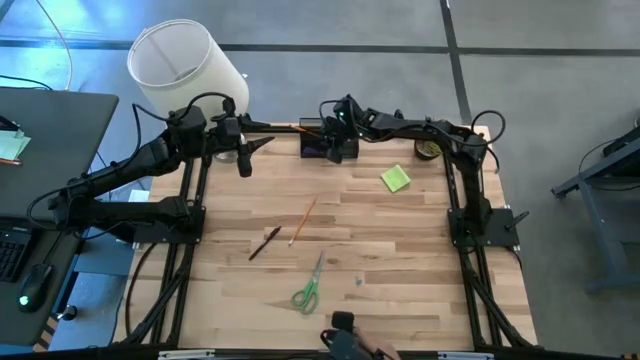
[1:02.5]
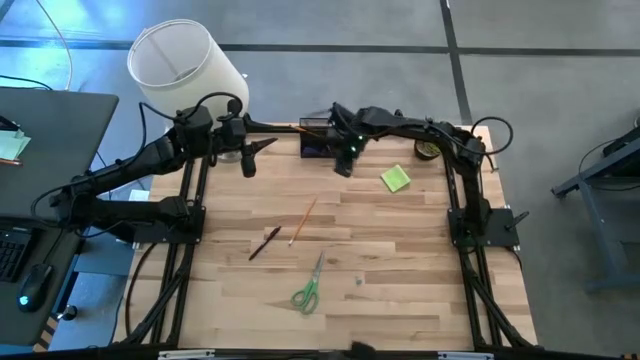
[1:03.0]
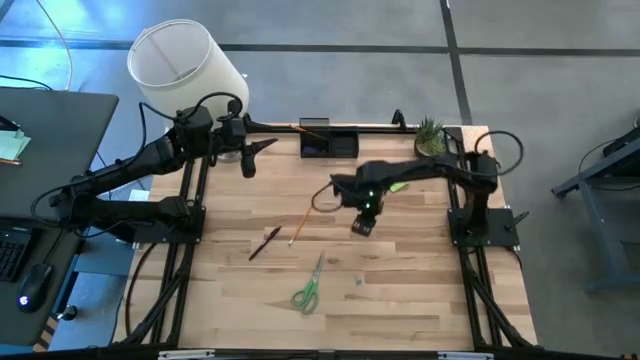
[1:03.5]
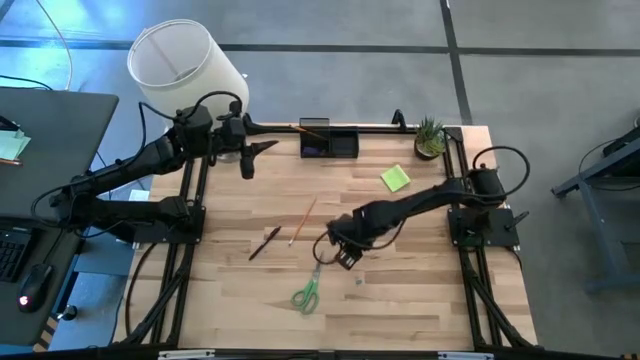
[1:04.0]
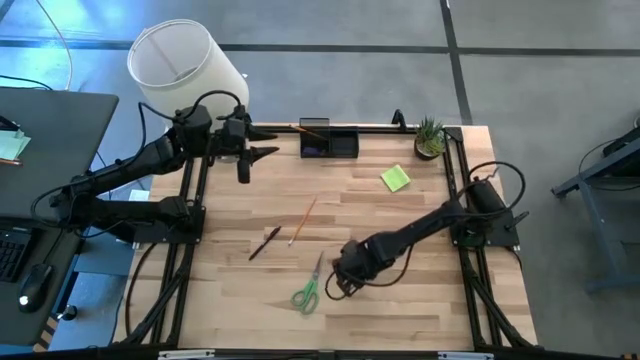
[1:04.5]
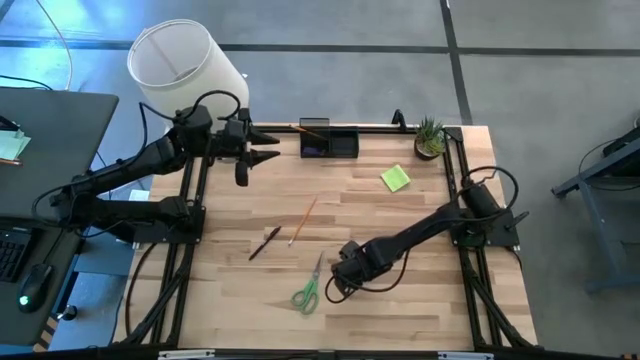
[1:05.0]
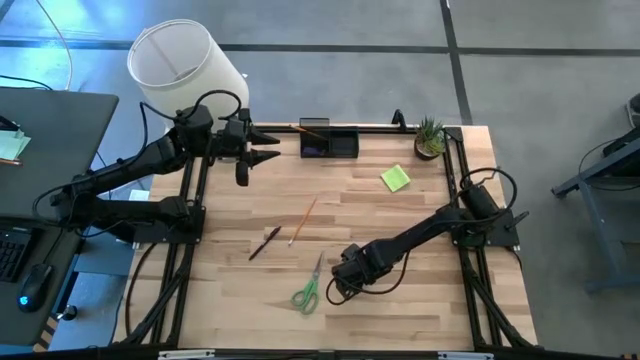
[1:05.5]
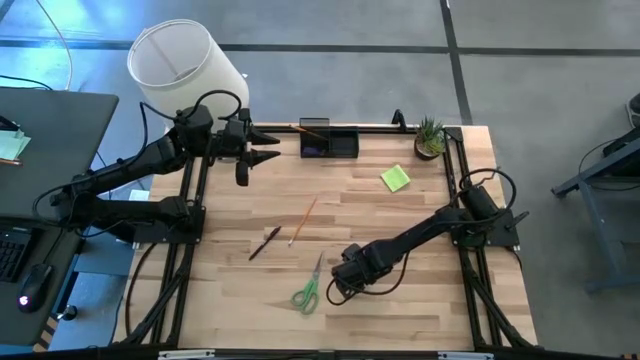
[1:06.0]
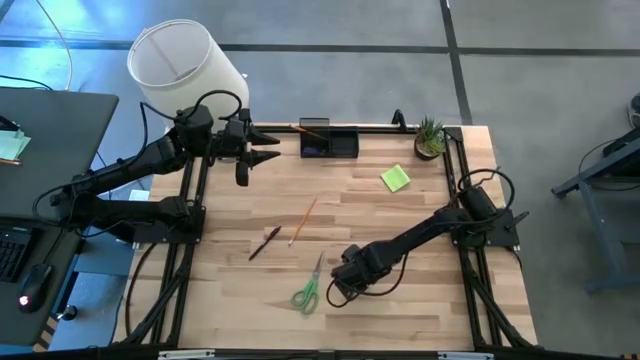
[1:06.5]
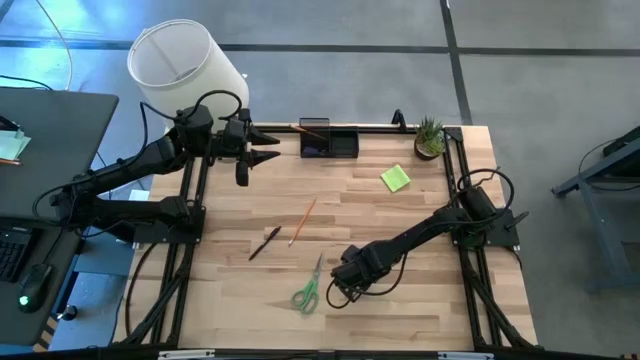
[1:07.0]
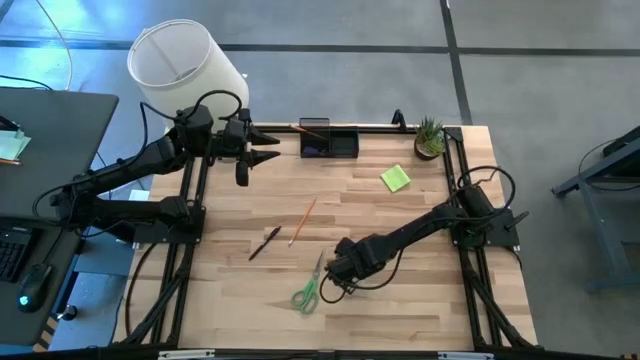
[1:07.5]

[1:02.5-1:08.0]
Task: Pick and place office supplies into organizer
Put the blue binder clip into the black desk organizer

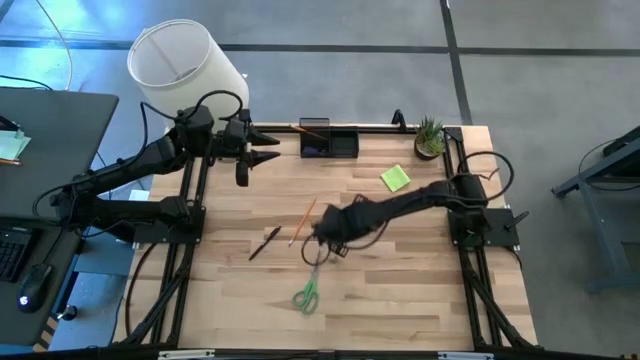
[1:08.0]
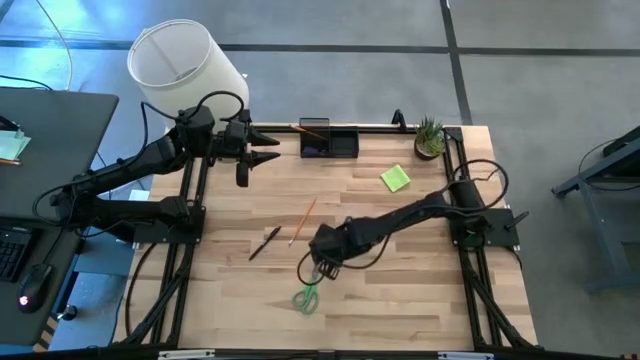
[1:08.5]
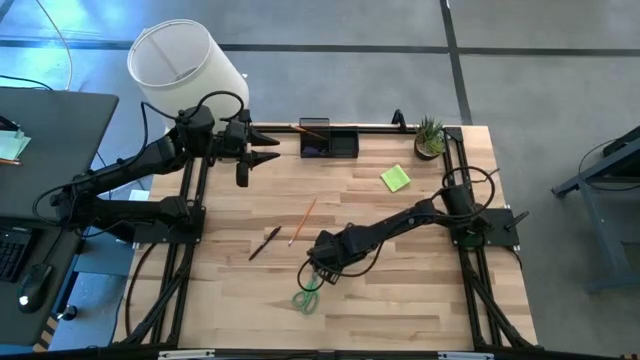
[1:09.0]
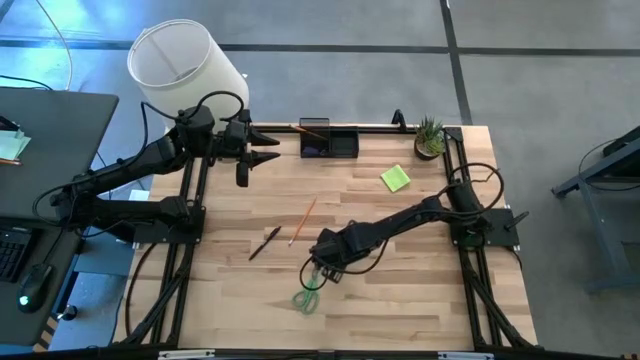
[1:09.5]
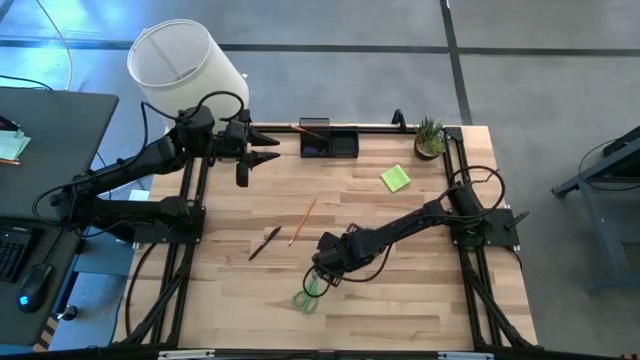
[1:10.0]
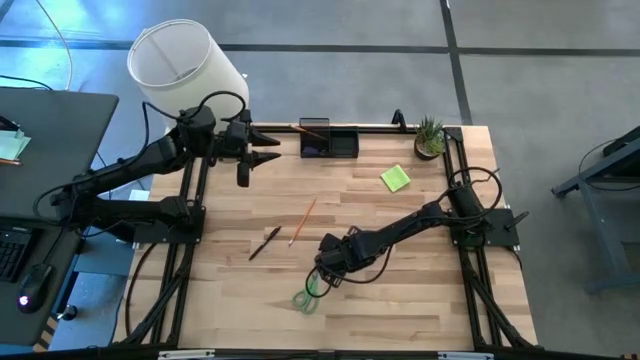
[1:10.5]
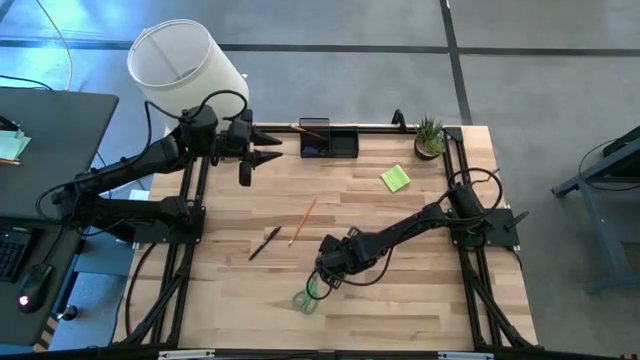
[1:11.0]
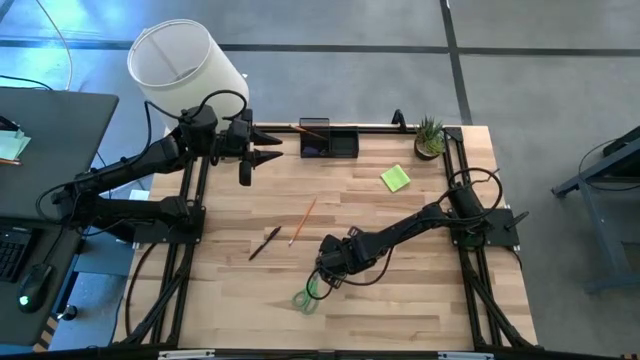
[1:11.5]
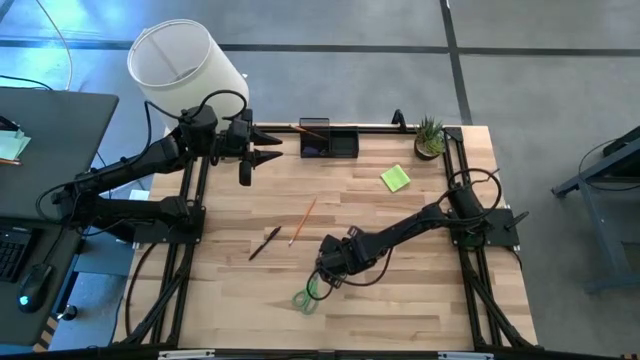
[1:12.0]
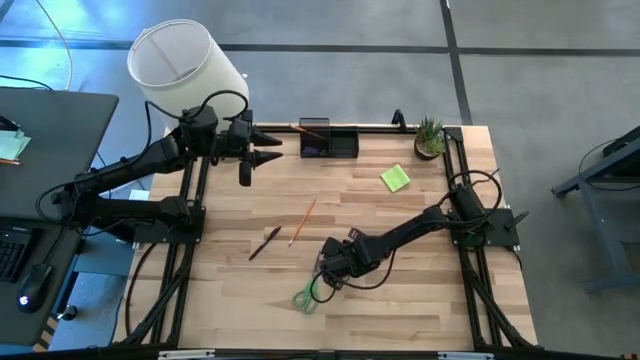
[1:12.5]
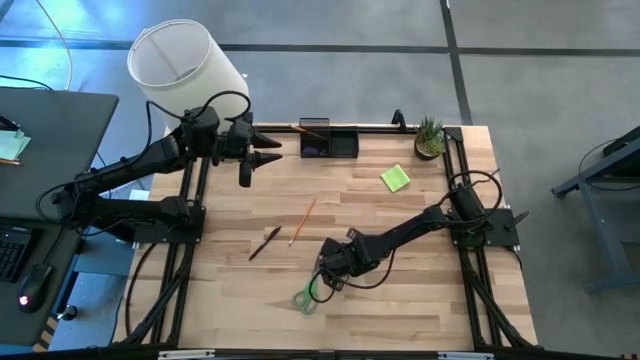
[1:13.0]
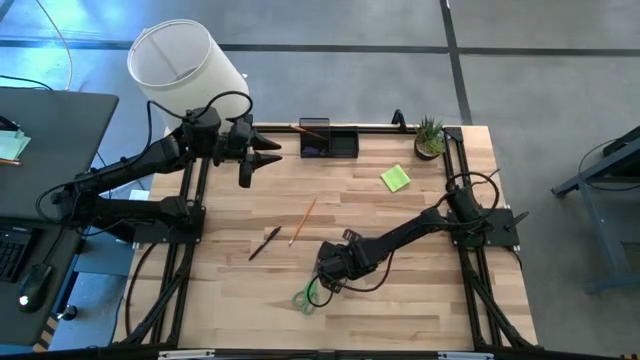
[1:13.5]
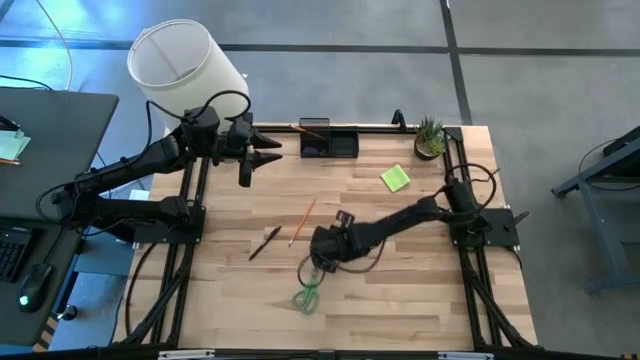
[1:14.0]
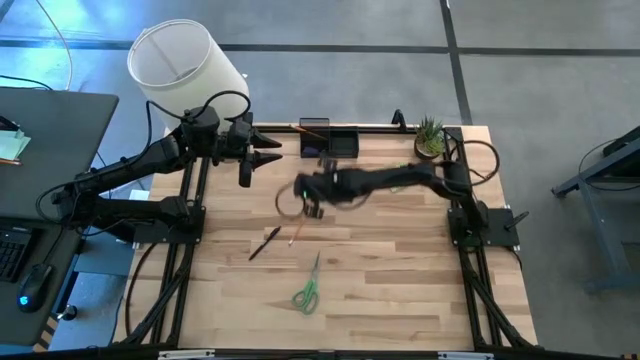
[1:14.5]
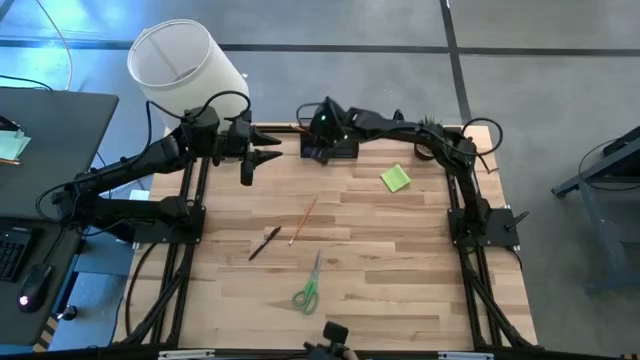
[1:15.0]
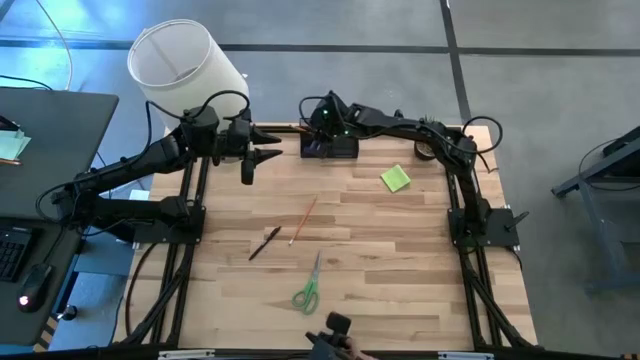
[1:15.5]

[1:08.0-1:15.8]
Put the blue binder clip into the black desk organizer

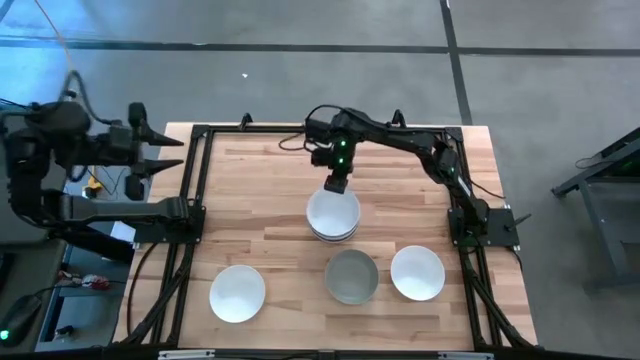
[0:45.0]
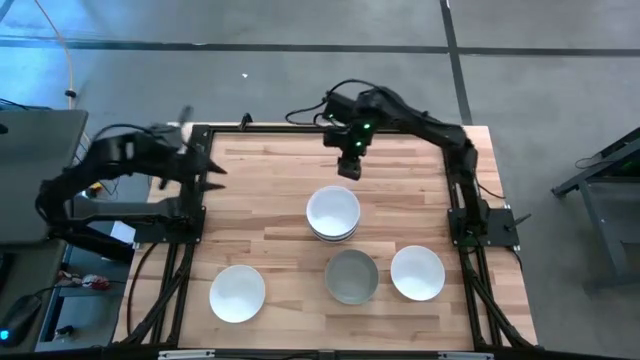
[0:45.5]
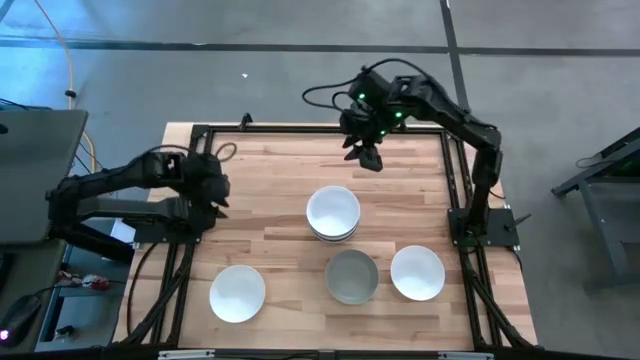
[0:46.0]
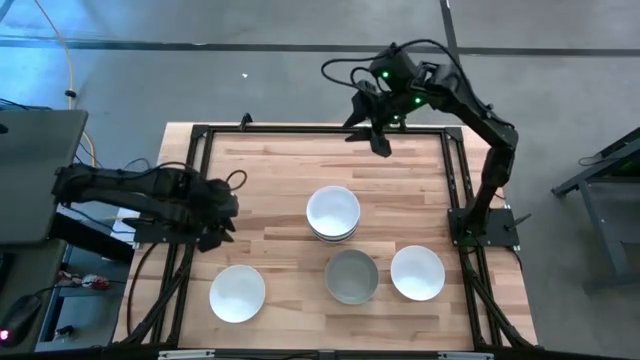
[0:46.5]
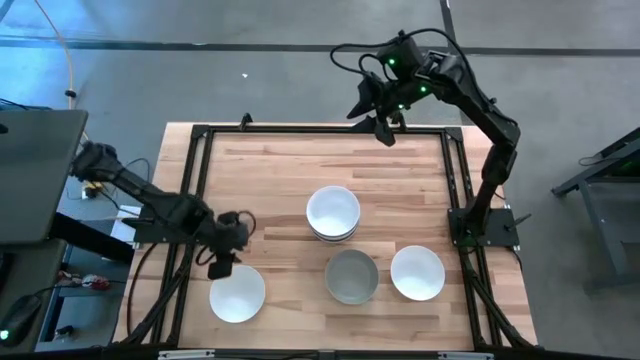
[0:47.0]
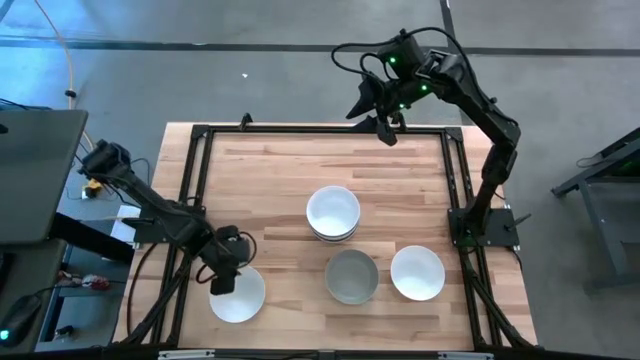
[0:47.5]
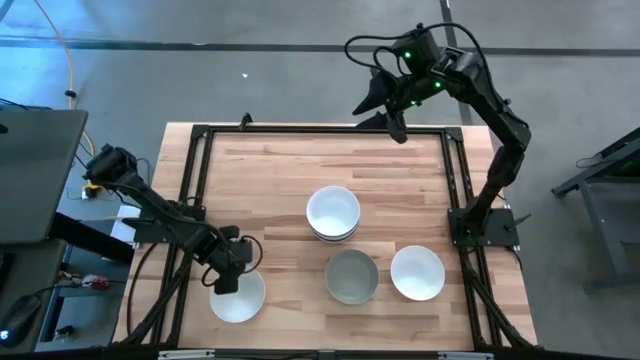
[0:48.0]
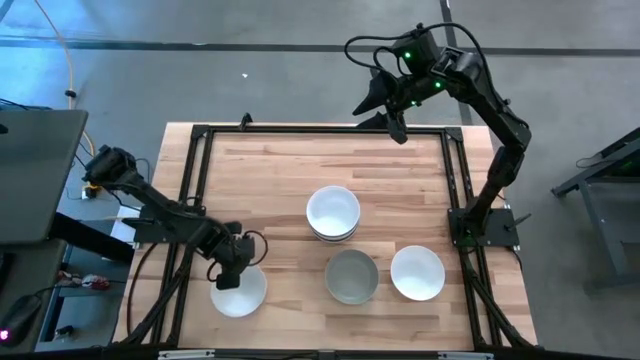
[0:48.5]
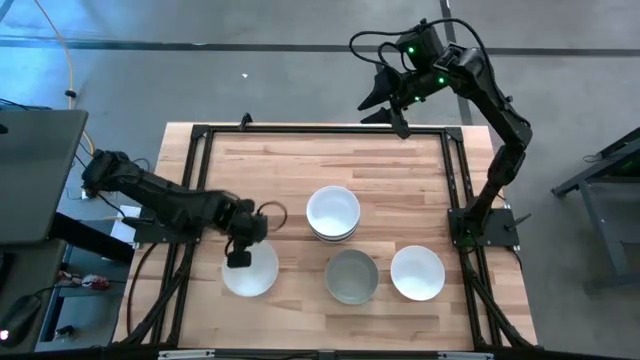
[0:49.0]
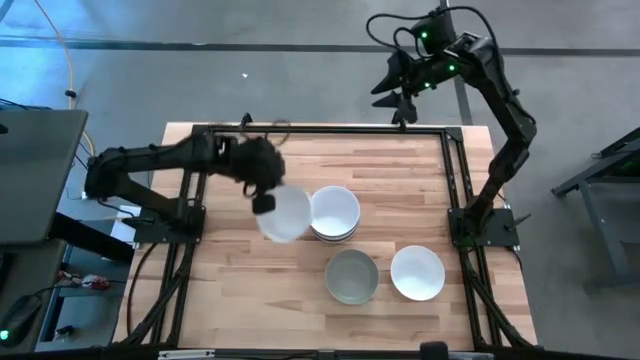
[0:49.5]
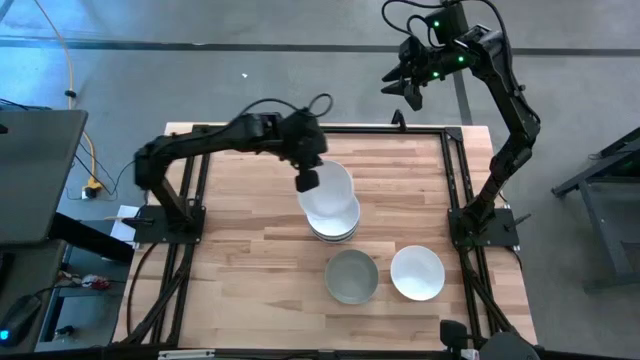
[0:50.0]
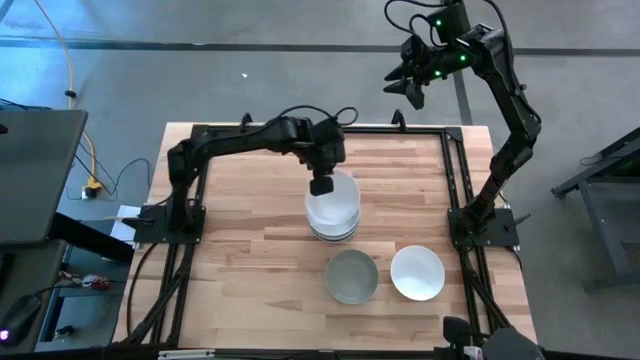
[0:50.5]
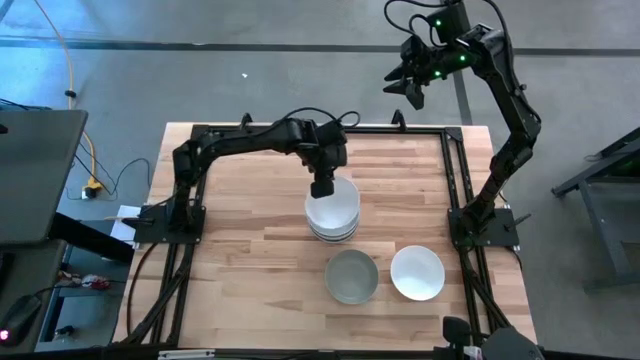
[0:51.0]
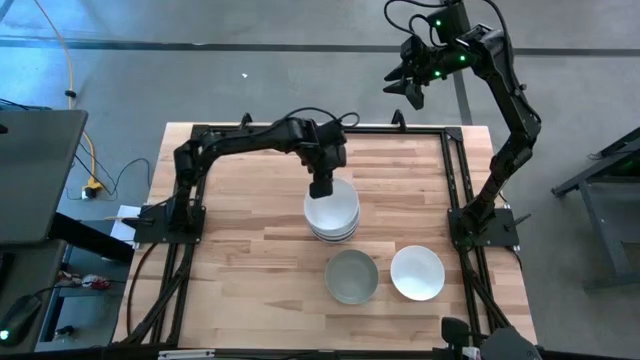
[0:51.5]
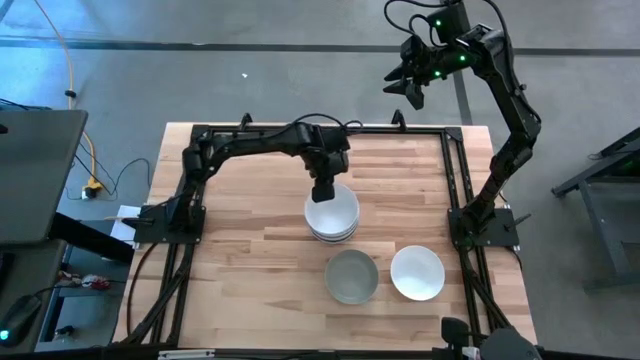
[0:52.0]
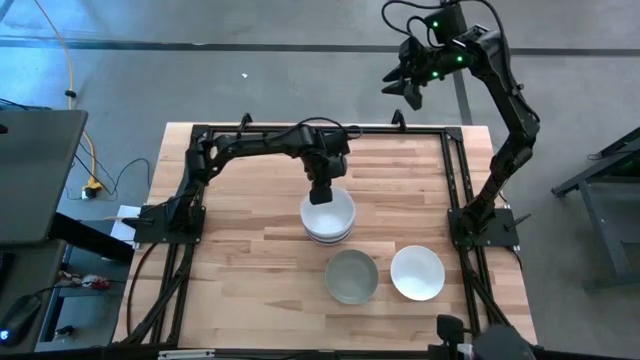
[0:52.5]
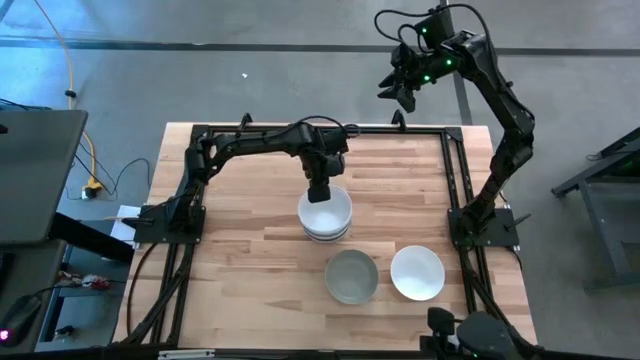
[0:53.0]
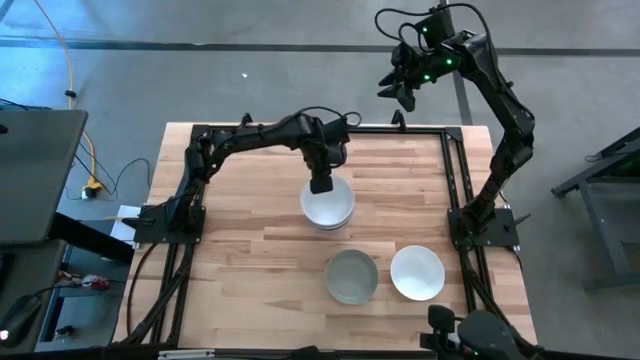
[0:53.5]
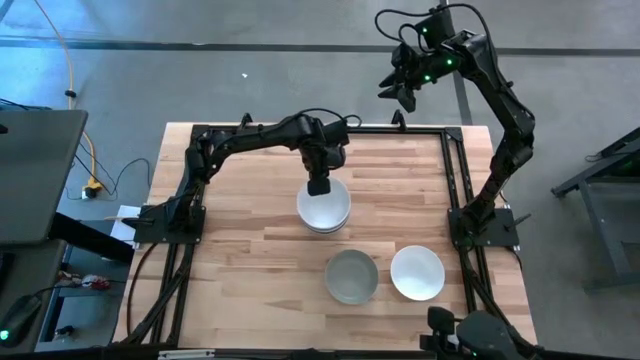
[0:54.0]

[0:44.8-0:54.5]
Task: Nest bowls inside each other
Stack the left white bowl on top of the top white bowl
